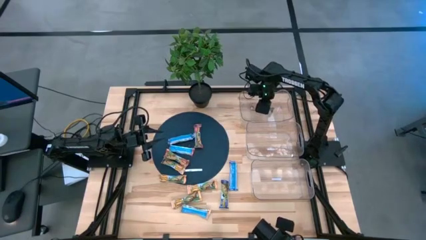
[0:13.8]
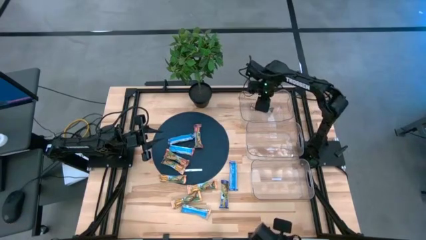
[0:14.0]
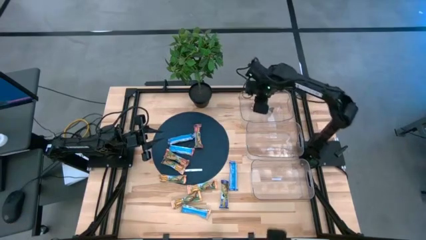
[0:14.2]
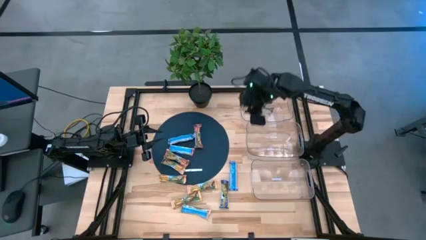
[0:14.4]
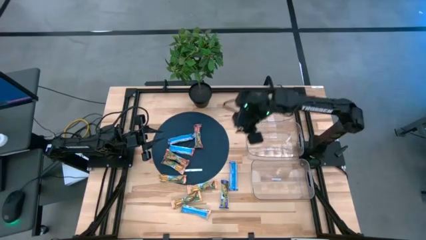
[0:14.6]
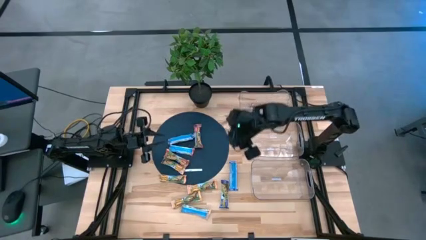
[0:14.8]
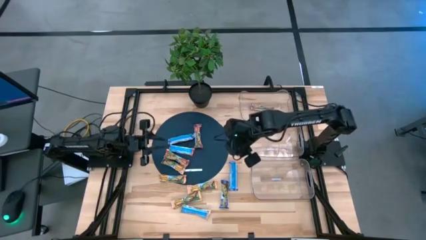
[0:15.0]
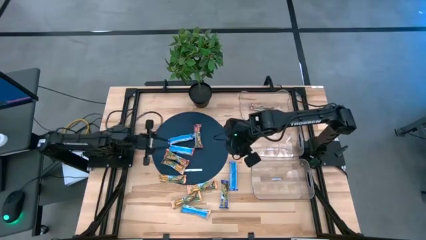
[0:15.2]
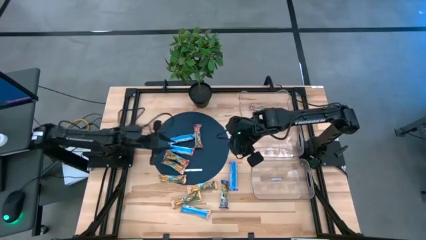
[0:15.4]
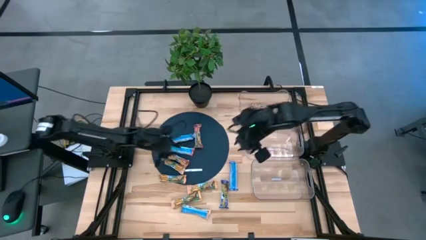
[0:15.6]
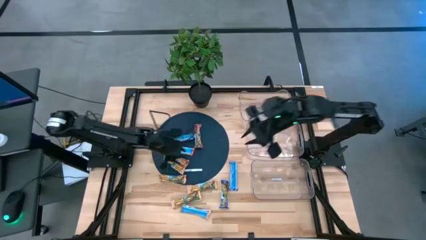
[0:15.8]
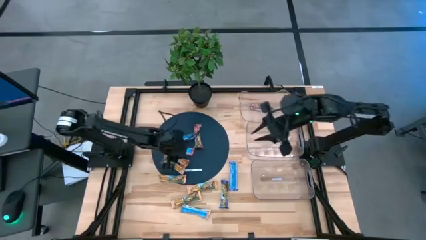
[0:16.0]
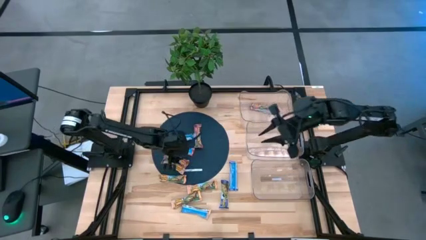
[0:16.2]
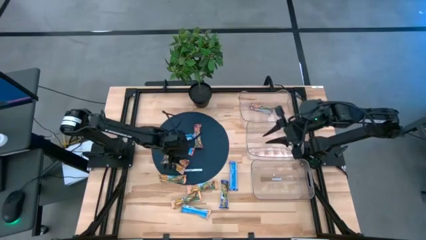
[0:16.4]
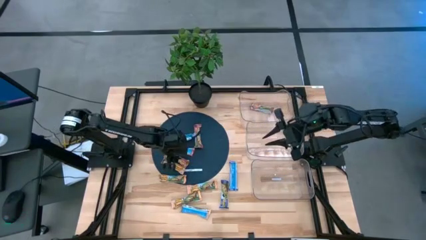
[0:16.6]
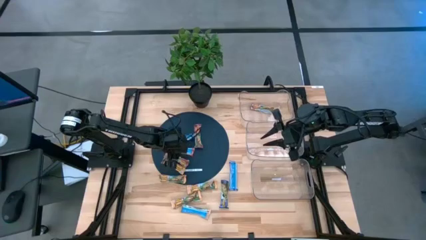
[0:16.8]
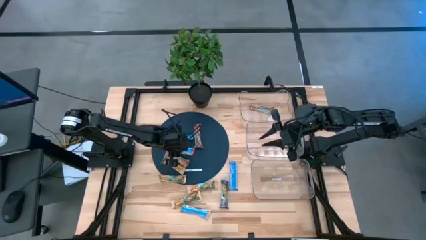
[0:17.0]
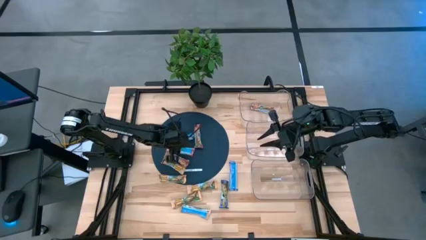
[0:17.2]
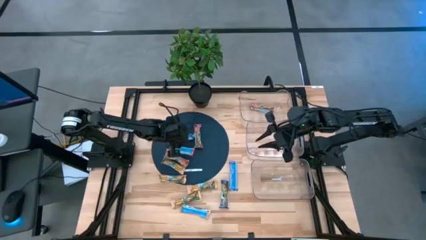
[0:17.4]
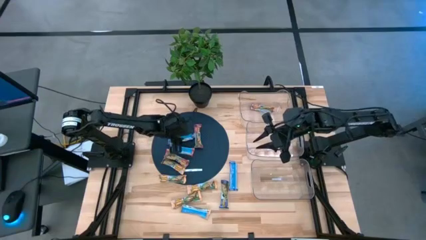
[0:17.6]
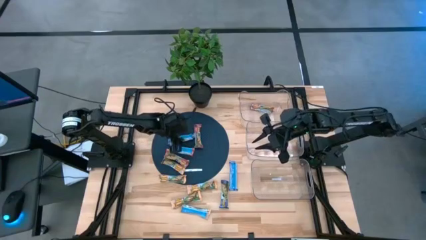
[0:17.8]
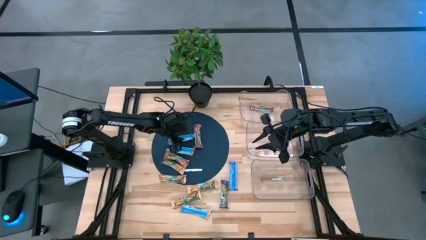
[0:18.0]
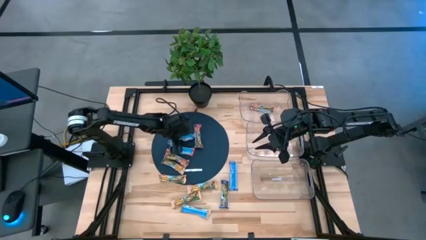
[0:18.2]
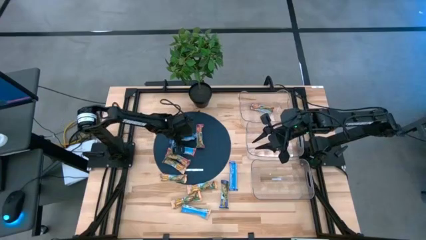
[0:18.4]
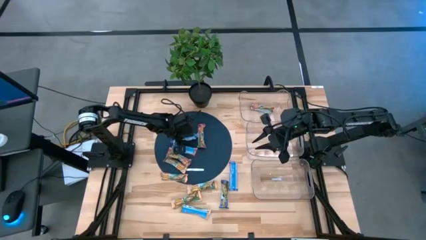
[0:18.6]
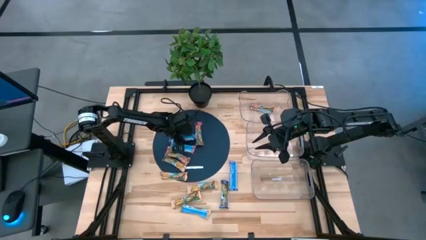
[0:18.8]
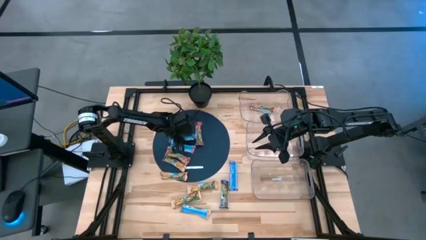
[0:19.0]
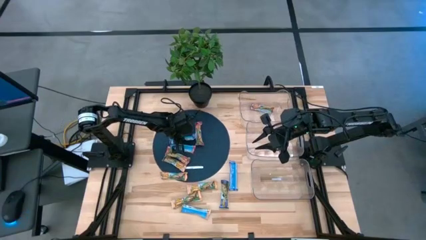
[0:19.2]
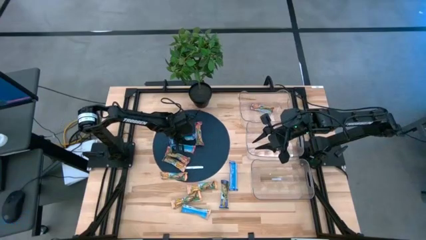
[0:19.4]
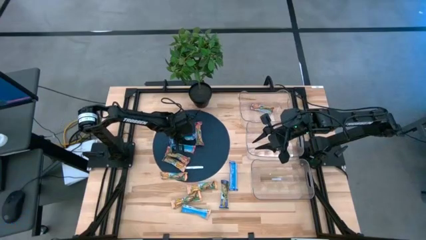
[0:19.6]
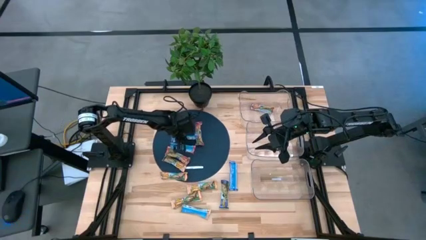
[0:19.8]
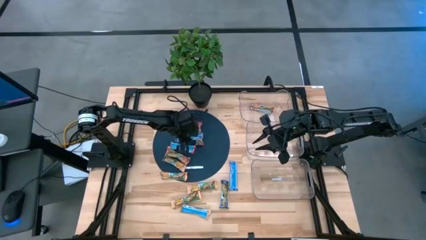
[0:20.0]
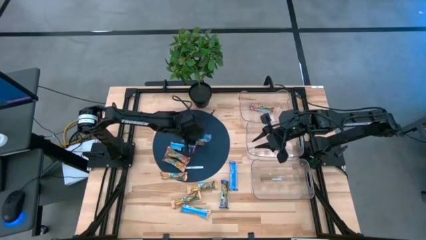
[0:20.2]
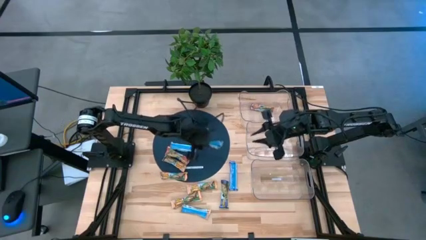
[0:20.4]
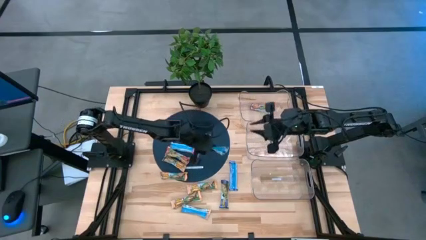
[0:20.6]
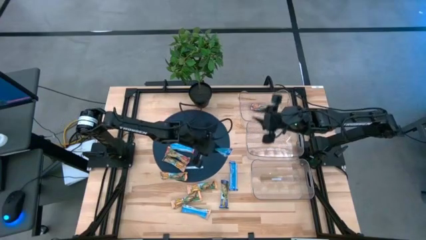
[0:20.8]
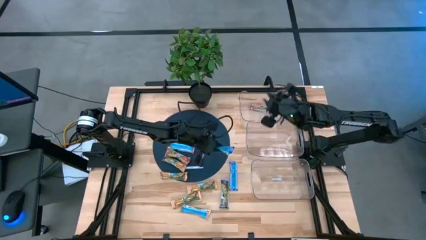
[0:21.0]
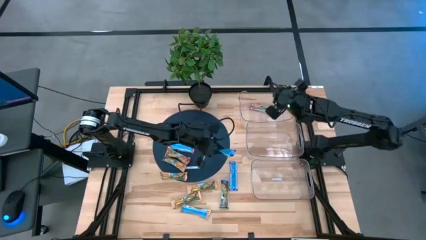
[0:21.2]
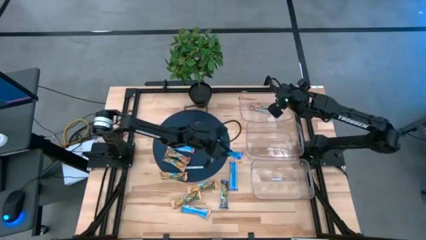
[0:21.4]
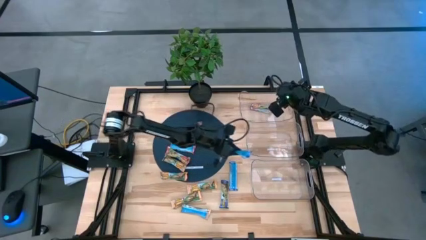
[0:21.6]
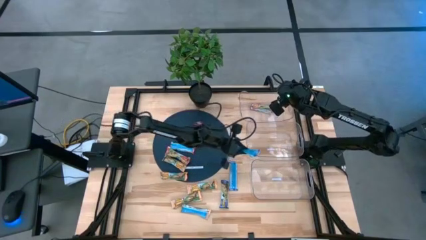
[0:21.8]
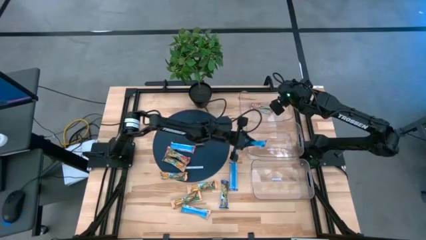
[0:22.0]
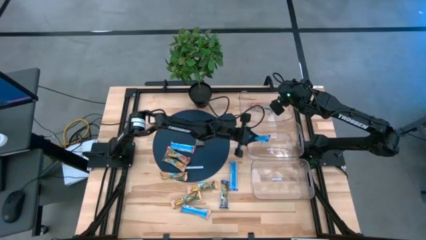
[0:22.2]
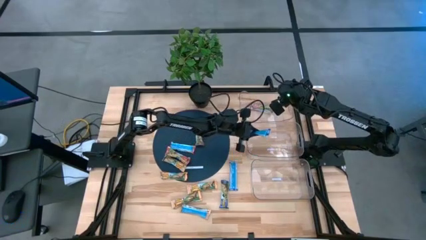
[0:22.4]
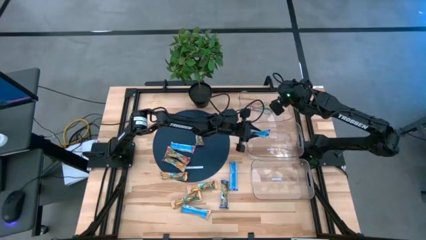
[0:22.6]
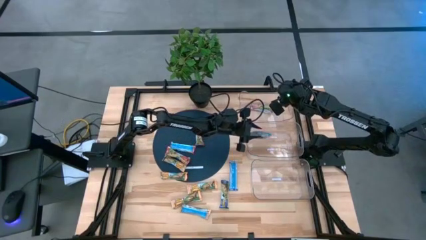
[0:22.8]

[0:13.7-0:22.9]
Task: Pick and place Granola Bars by type
Put the blue granola bar into the middle transparent bin

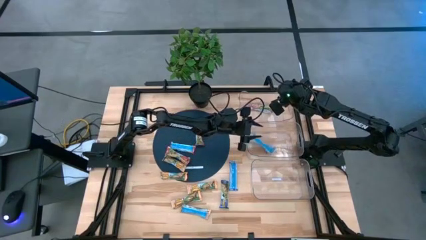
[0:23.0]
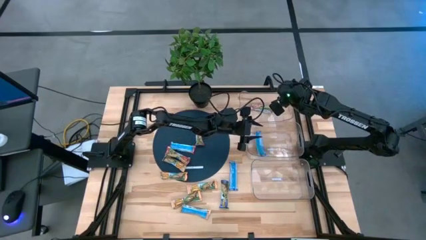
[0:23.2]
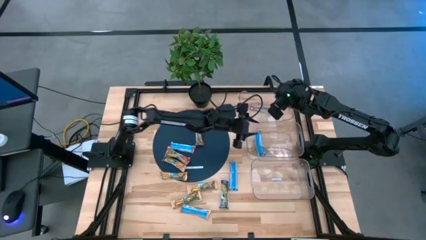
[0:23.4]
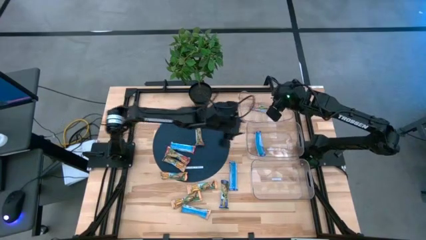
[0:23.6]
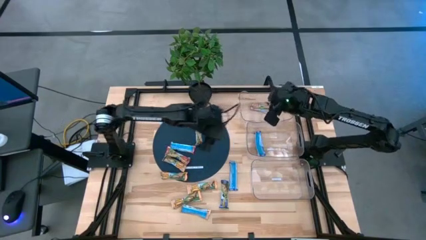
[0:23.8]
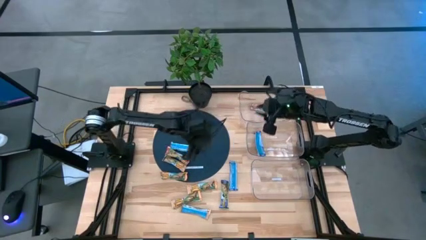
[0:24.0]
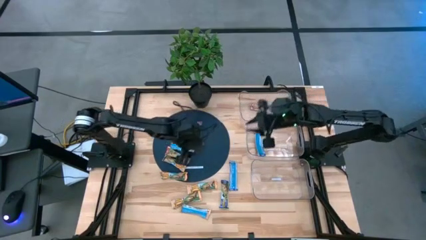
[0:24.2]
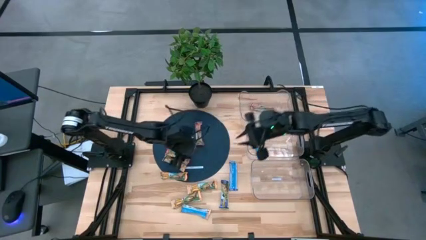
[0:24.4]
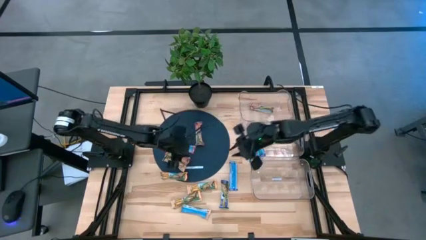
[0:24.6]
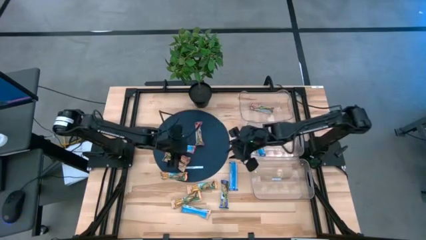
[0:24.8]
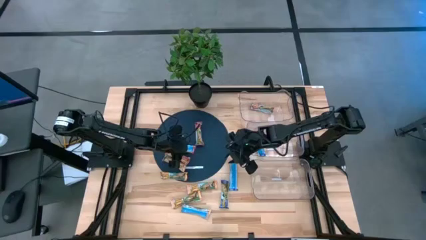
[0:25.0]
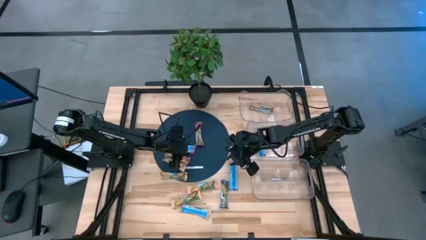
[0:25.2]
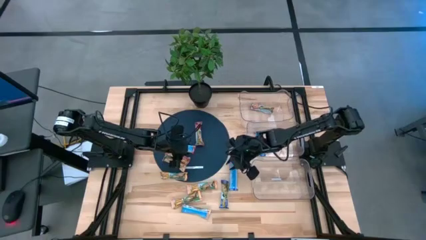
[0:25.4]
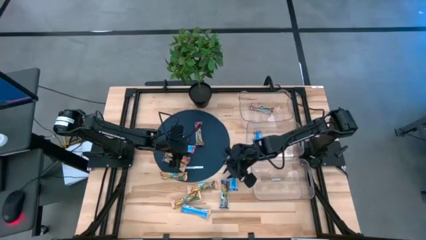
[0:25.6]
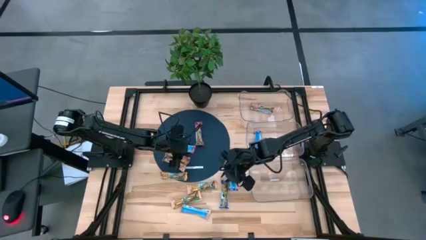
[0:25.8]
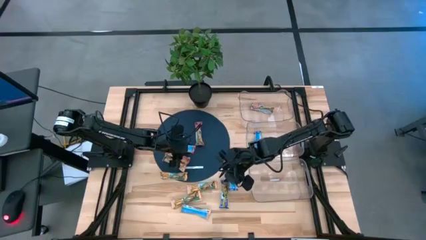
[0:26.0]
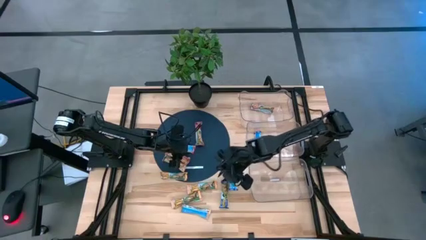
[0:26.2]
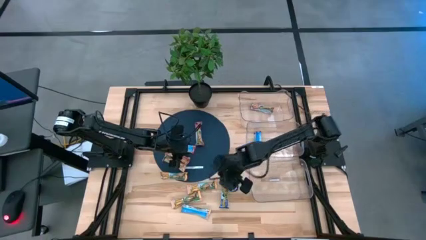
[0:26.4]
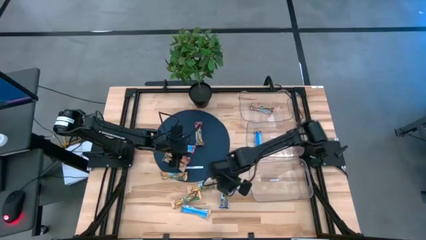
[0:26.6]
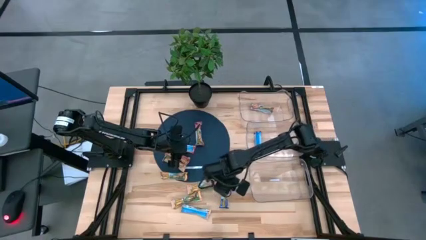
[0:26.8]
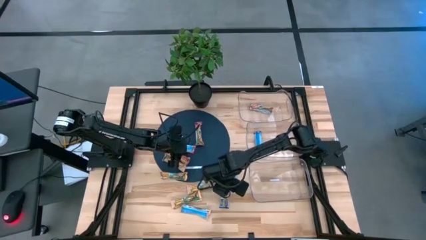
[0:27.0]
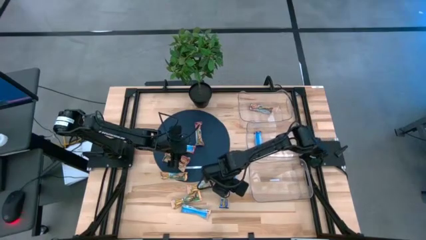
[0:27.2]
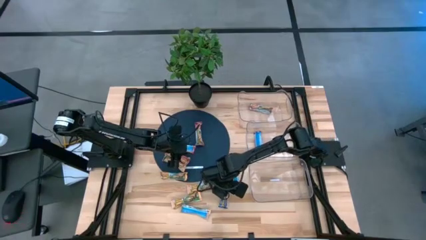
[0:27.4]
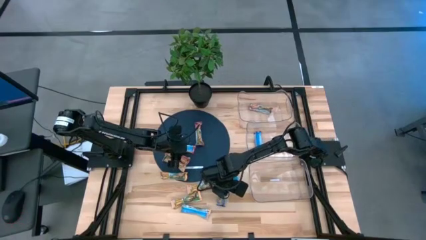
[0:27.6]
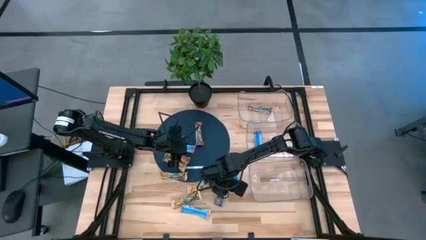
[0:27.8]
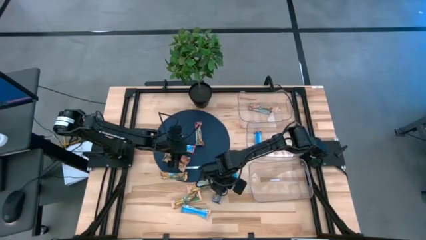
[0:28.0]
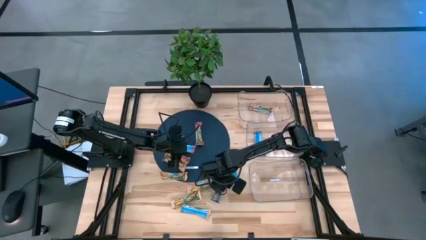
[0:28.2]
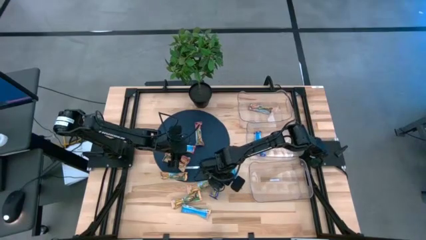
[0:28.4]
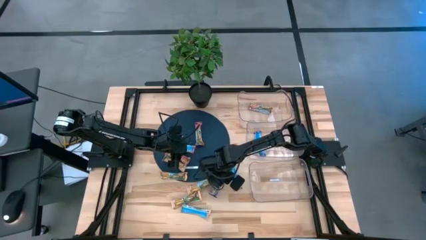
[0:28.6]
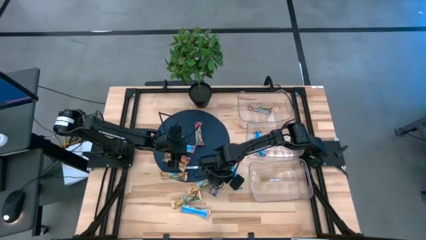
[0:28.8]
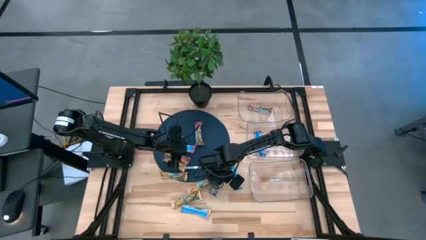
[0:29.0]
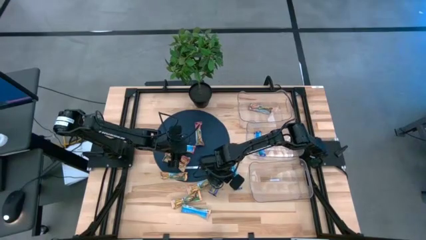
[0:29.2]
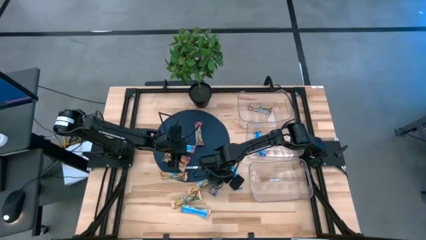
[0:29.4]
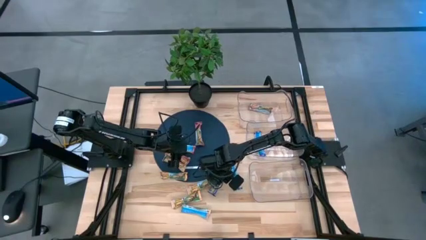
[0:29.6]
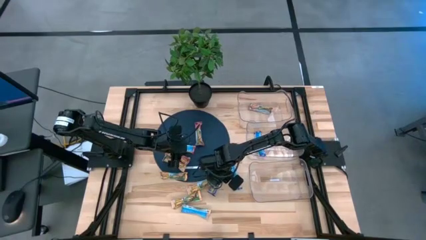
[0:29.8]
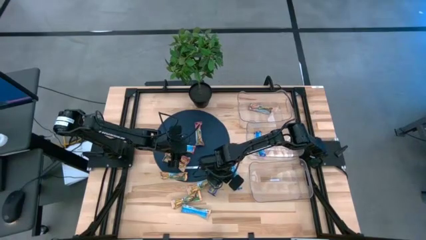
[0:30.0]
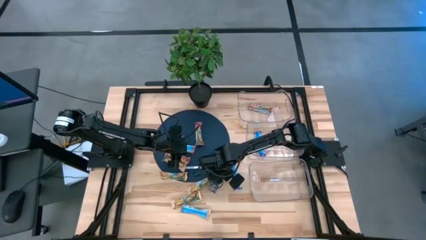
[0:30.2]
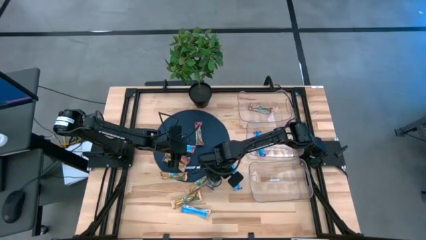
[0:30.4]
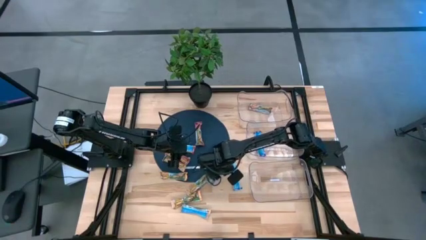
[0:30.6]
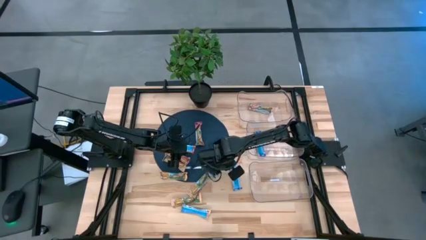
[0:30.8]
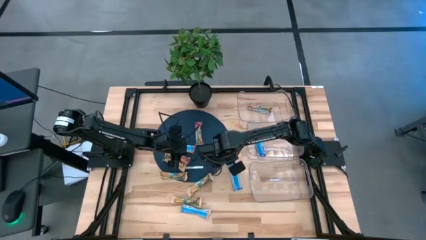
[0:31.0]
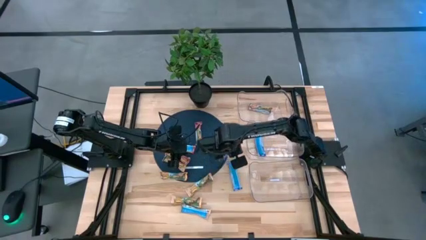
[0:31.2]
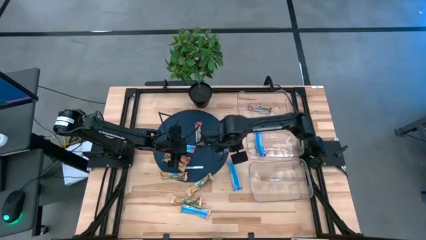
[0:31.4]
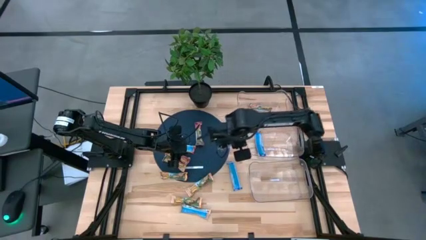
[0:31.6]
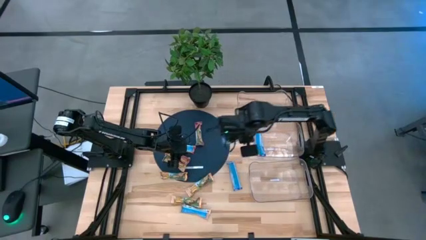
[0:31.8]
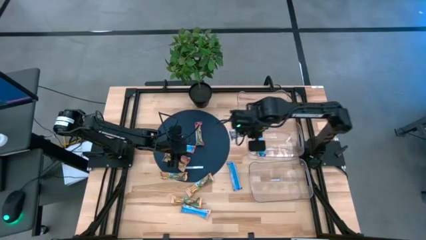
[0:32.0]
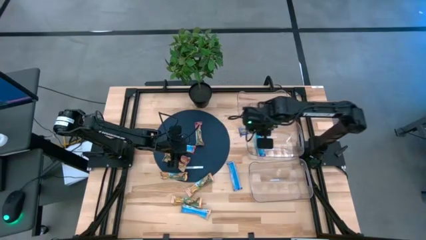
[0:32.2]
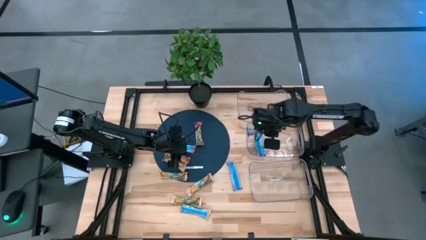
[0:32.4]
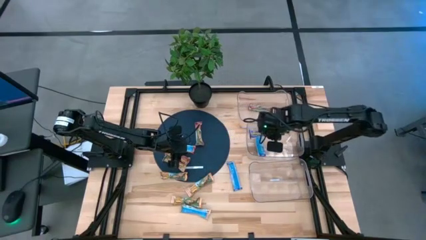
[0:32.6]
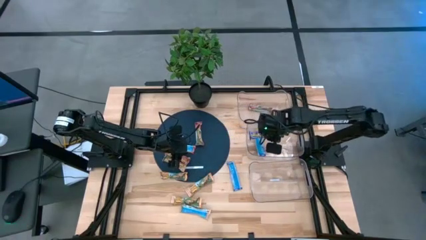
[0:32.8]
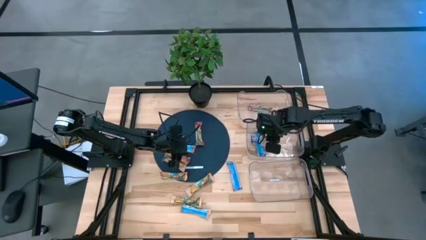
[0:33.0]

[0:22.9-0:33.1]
Put the blue granola bar into the middle transparent bin
